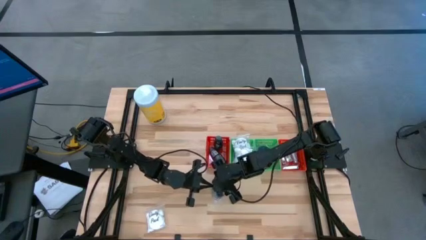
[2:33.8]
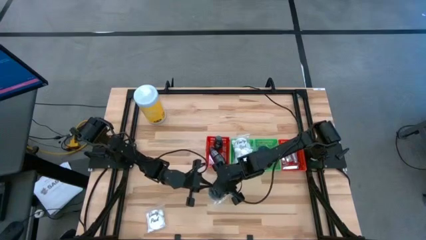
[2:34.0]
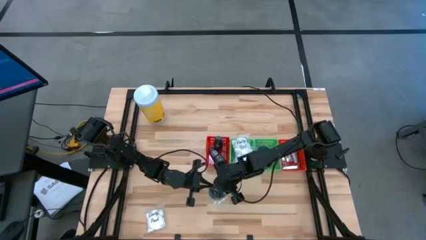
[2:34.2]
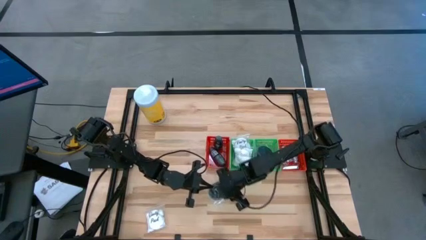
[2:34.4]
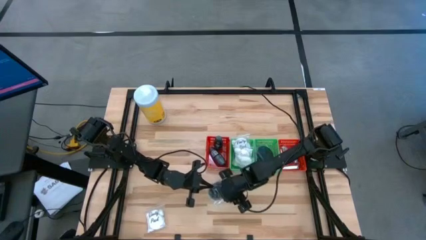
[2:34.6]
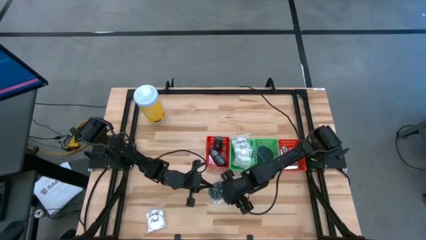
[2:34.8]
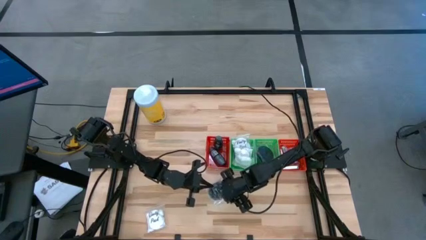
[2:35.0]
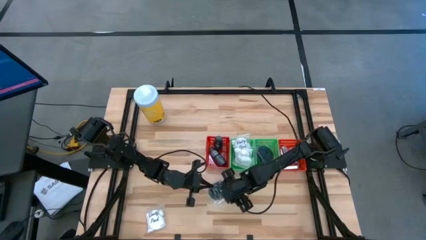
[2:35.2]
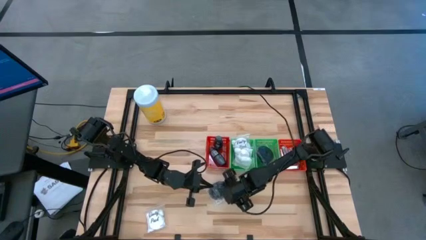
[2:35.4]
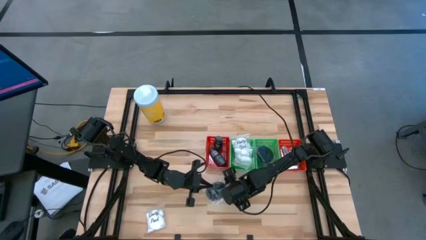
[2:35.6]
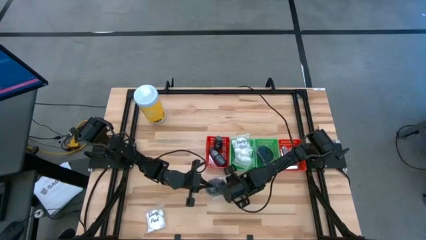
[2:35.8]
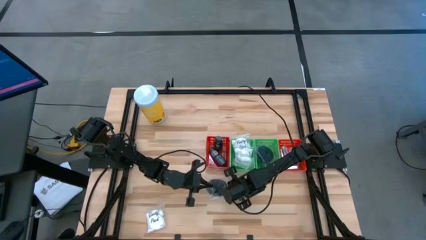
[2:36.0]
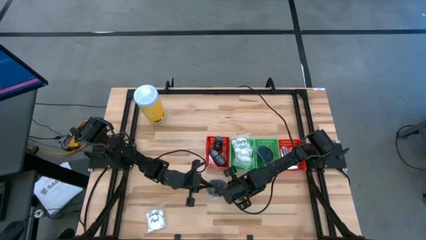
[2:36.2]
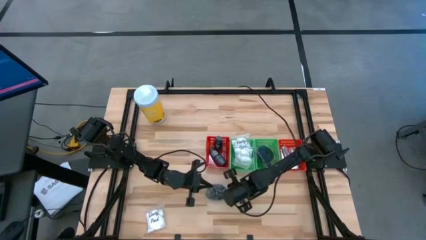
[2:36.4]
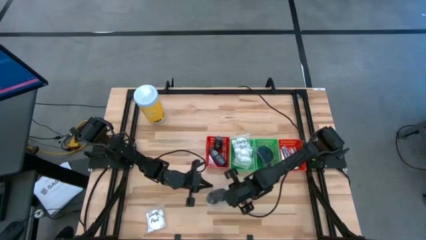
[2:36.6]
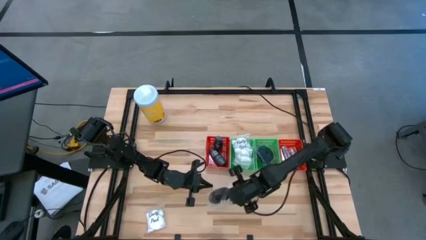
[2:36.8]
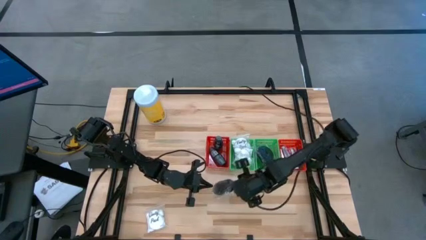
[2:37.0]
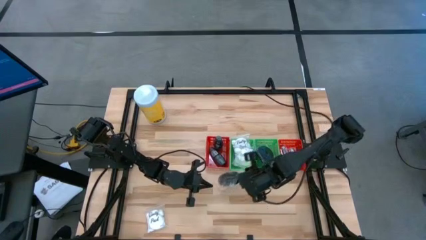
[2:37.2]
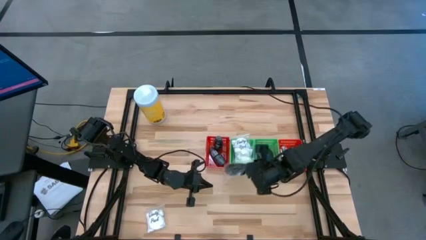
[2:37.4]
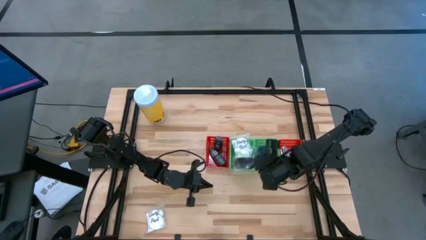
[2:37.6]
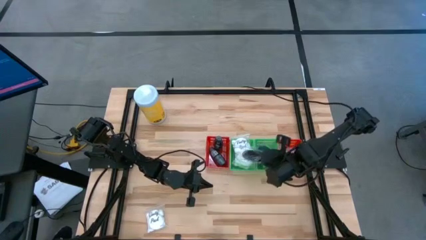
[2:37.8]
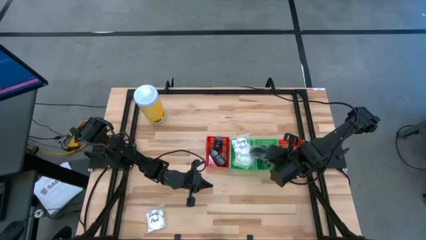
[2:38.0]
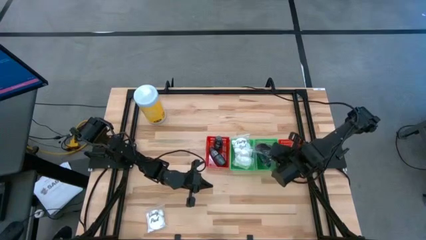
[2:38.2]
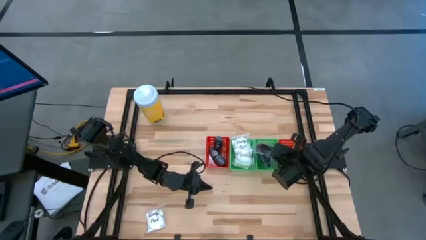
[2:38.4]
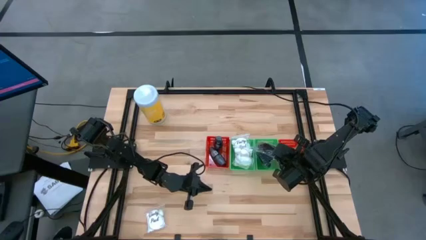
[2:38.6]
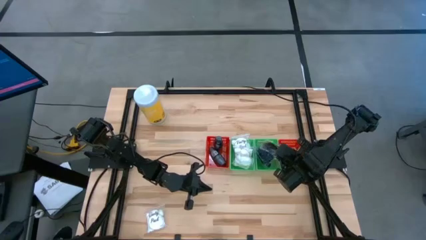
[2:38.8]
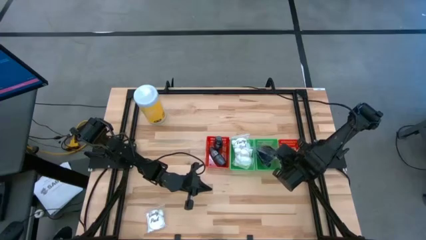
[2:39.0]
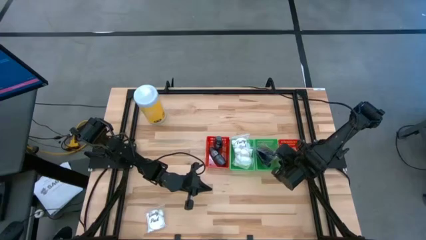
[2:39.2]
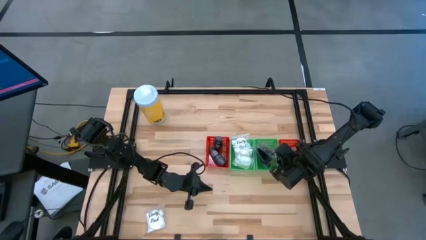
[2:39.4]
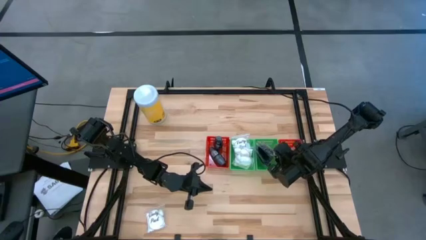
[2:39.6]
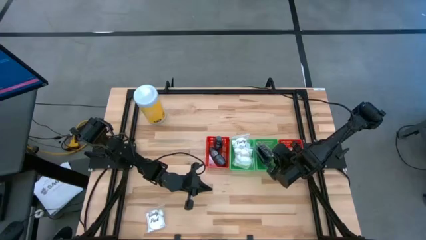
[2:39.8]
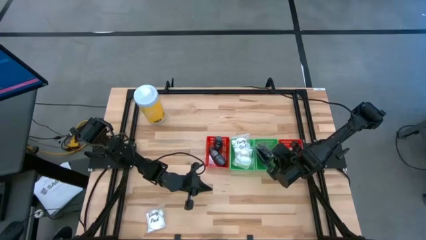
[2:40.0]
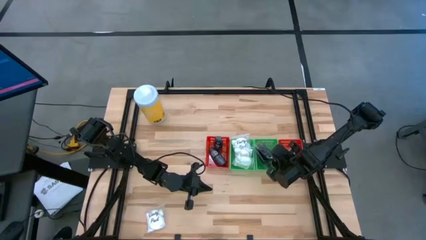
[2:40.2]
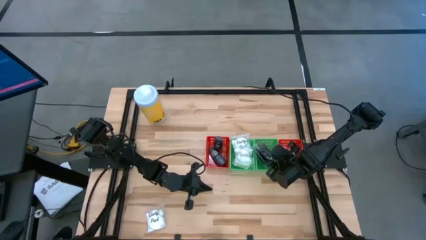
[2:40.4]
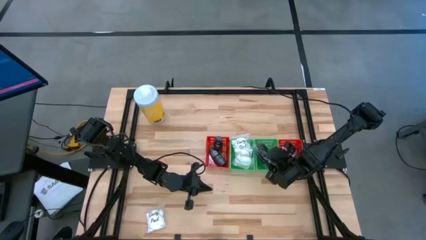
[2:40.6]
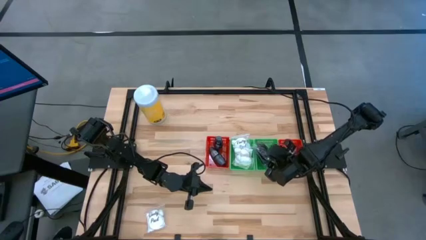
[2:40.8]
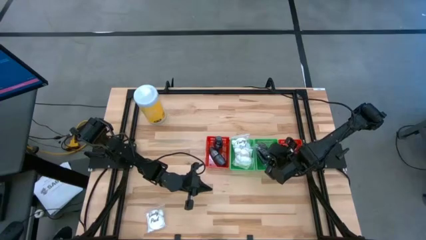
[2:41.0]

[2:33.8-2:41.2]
Task: Pick & Place Travel size toiletries
Put the black hairbrush into the right green bin

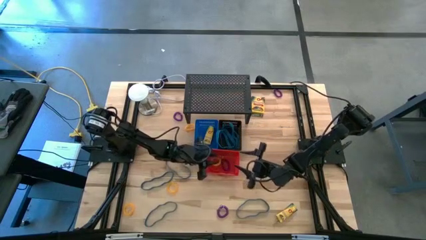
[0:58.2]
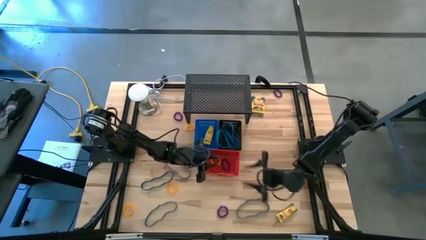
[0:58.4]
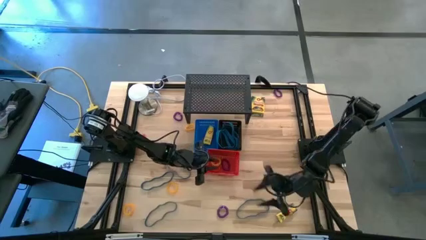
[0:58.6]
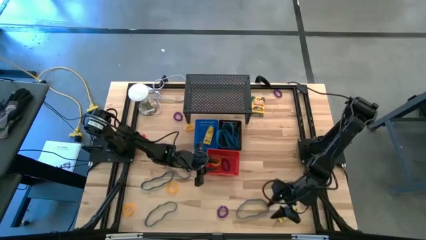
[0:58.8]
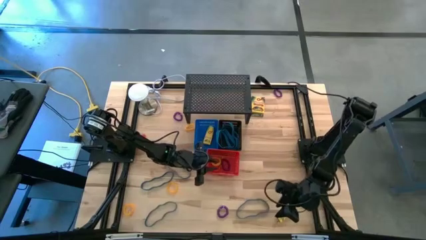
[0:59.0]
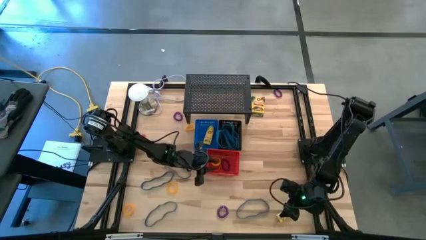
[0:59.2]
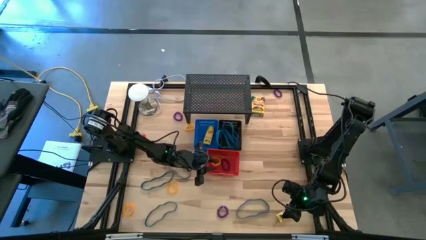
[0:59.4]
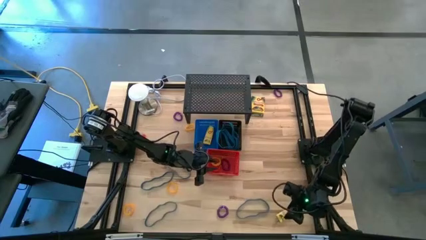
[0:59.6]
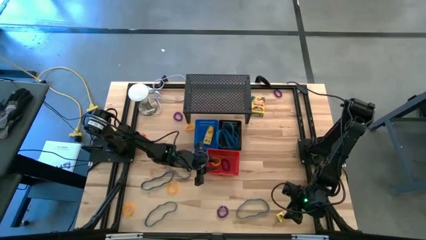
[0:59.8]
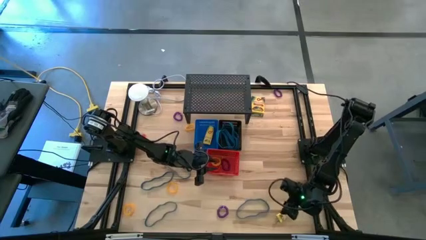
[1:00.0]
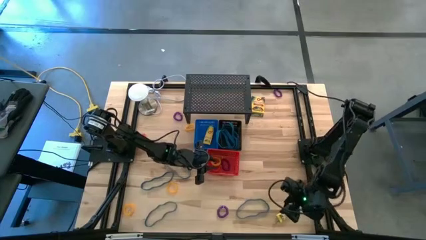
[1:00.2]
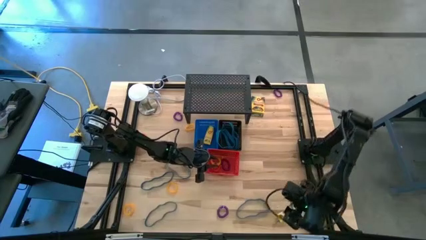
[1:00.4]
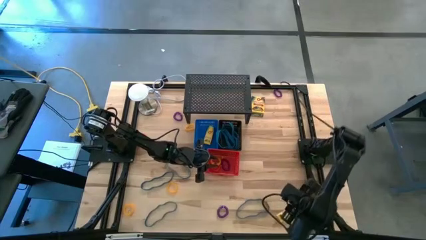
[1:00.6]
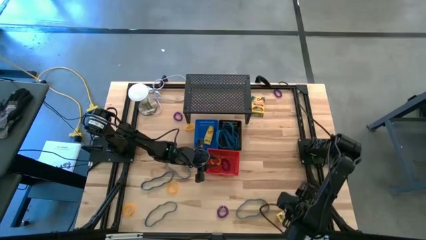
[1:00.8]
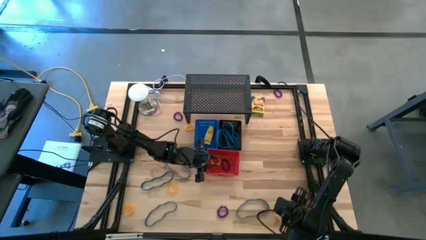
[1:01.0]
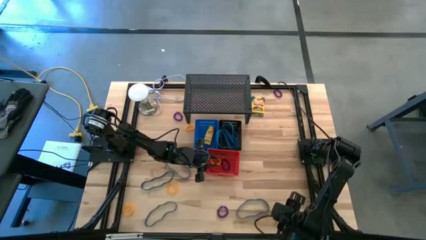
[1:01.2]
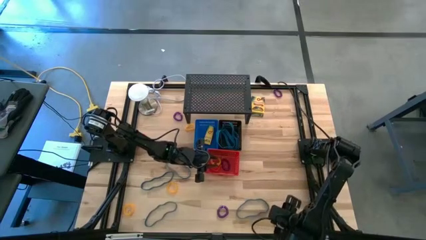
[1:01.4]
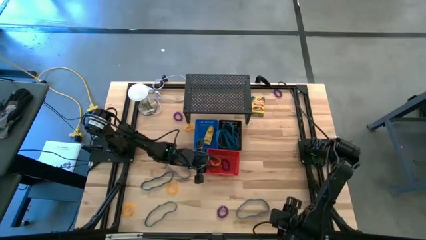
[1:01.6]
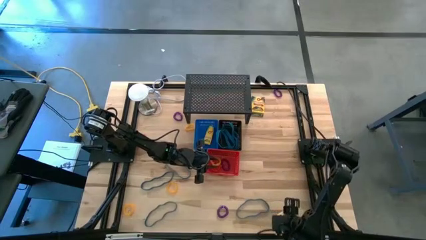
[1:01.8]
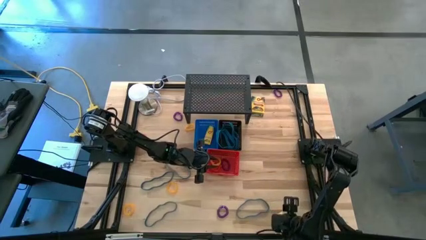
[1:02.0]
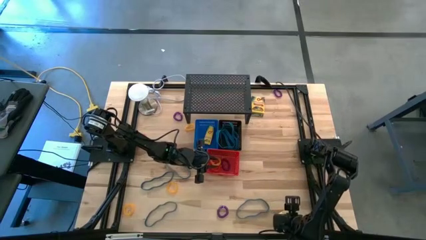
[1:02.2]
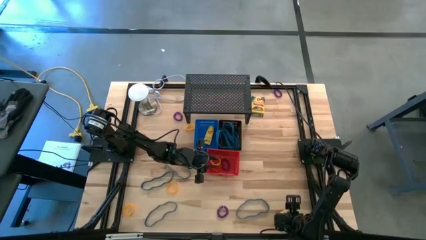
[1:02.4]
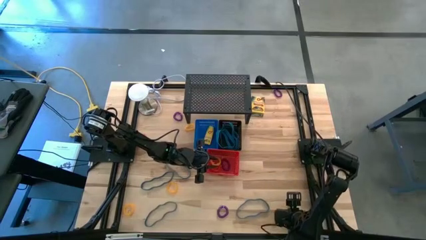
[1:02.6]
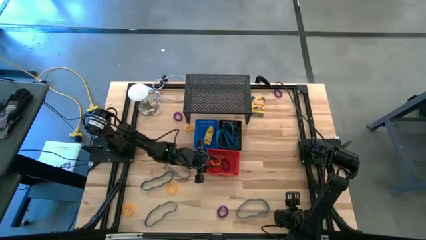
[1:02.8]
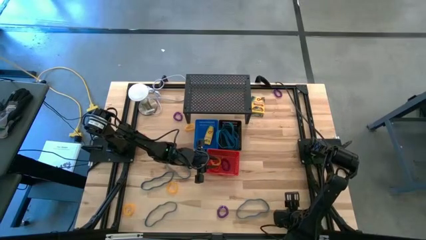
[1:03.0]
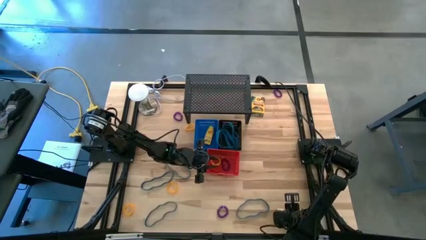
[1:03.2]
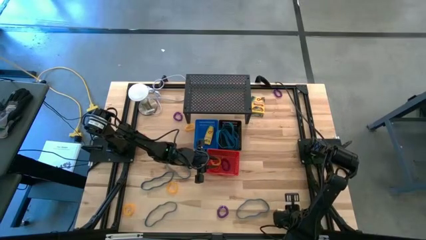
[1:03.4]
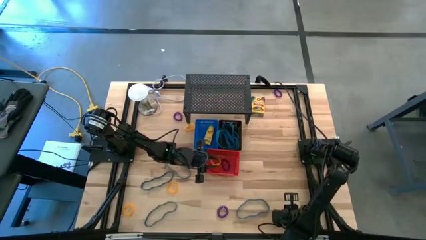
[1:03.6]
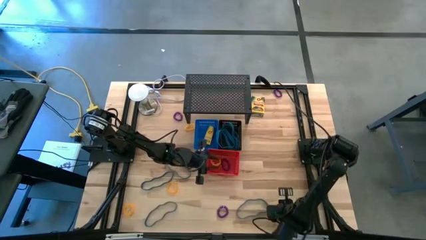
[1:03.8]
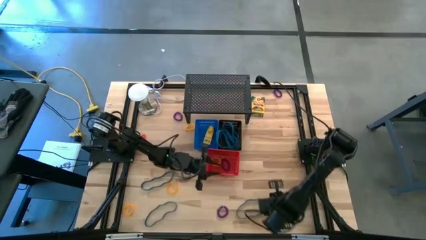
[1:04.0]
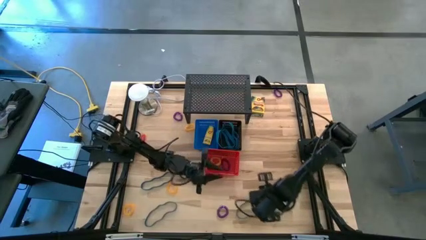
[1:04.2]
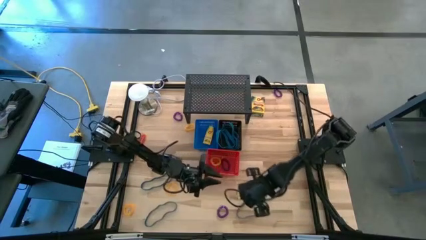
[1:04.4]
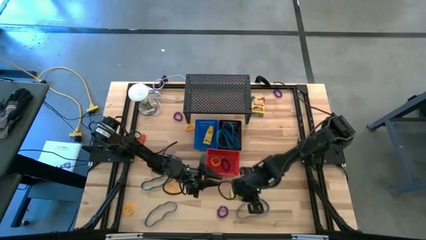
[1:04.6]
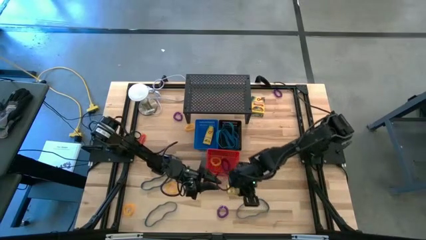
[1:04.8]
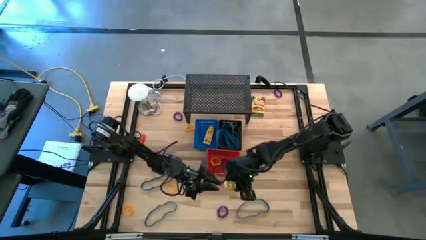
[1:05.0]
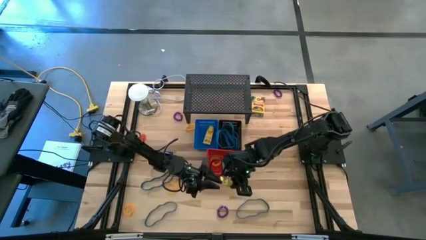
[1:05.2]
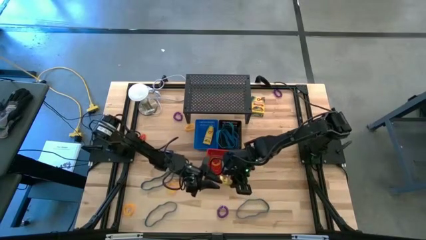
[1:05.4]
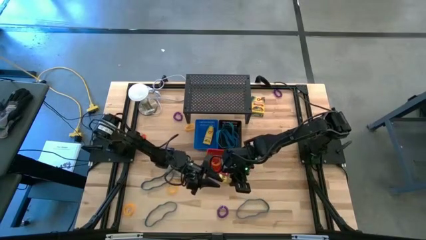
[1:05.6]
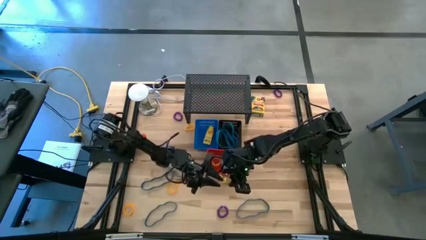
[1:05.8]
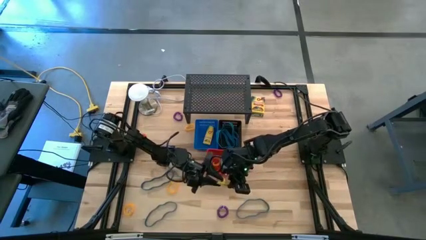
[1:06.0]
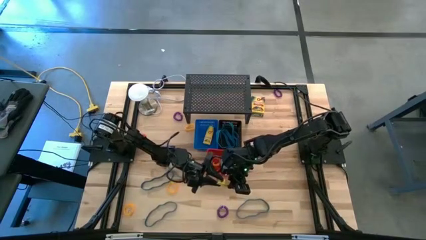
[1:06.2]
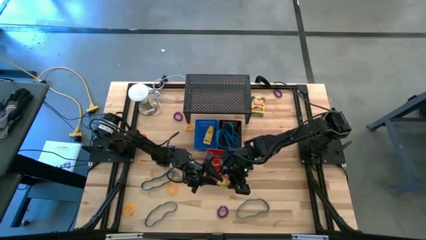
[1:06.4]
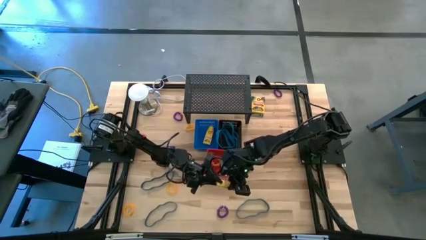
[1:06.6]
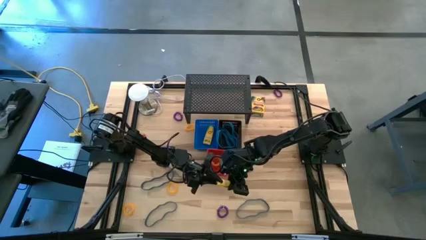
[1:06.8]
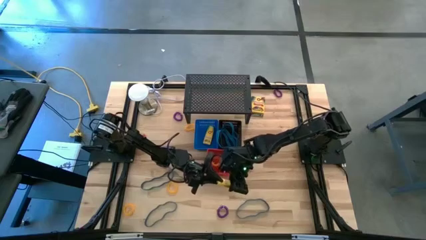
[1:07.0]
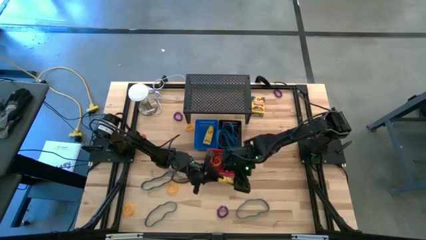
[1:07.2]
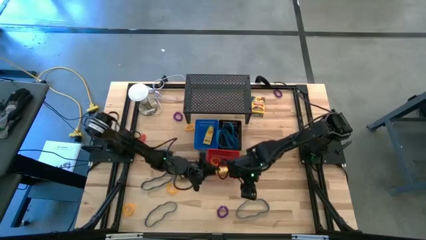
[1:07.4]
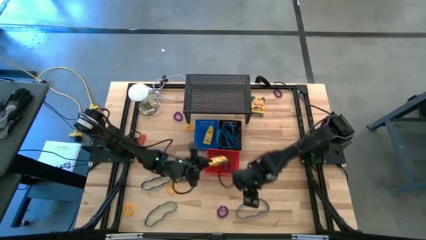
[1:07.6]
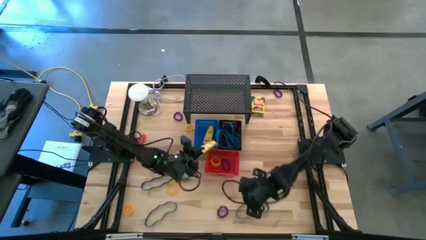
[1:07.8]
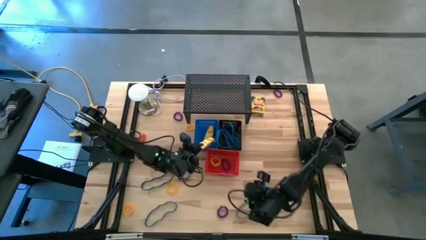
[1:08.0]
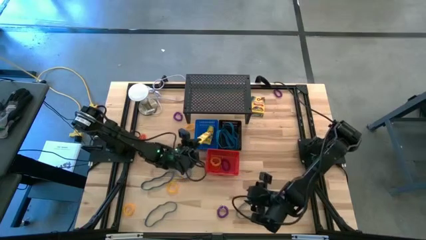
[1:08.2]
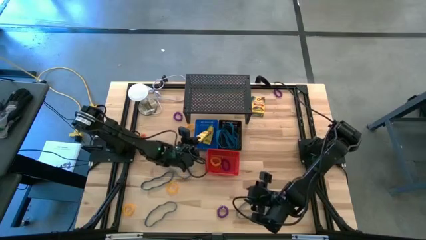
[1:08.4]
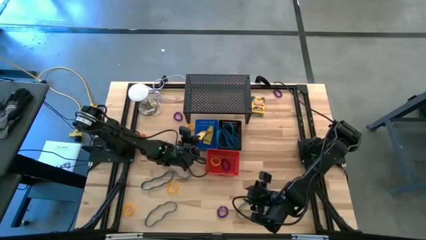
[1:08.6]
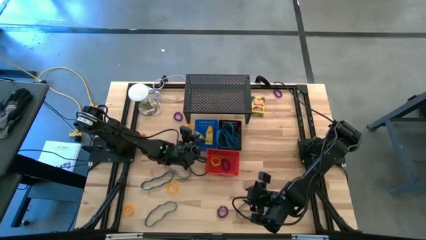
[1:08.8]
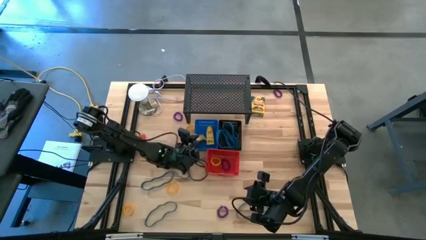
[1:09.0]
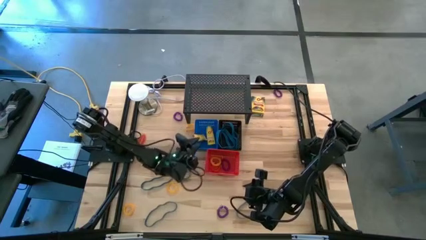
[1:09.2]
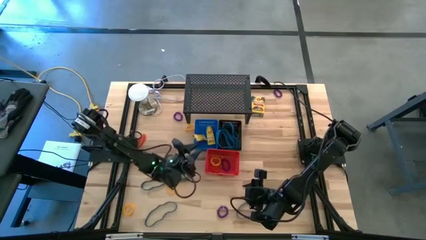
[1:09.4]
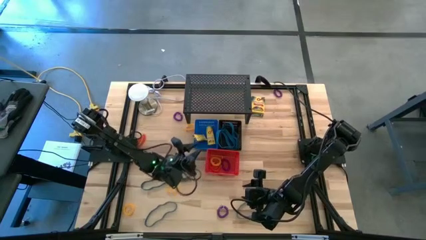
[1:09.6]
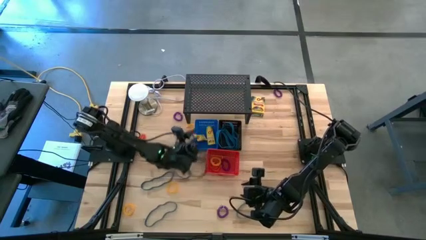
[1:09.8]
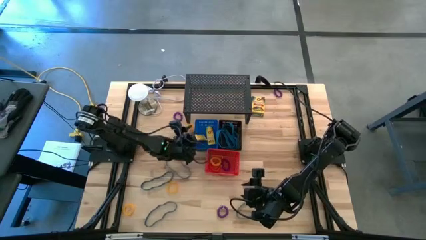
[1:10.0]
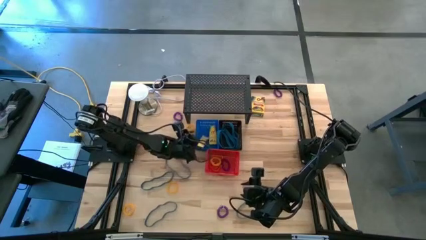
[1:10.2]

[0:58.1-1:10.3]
Task: Pick & Place Office Desk Supplies
Put the yellow crayon box into the blue bin
